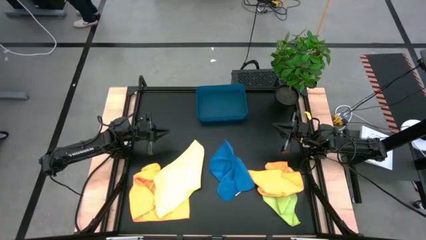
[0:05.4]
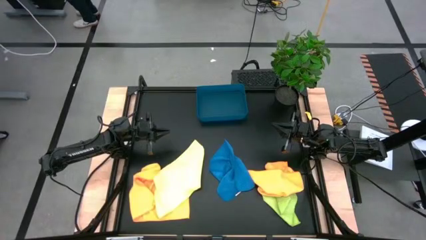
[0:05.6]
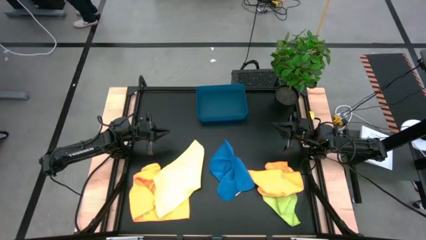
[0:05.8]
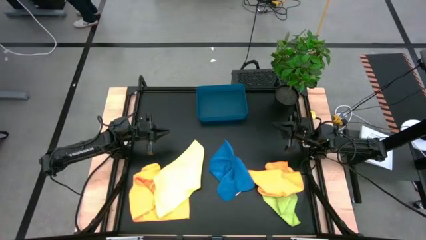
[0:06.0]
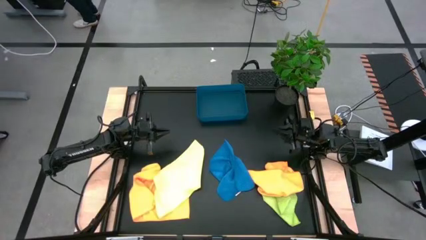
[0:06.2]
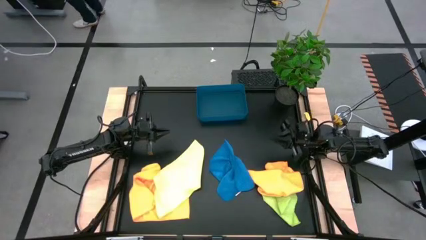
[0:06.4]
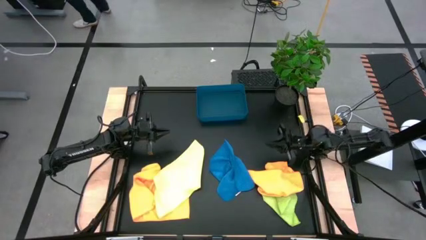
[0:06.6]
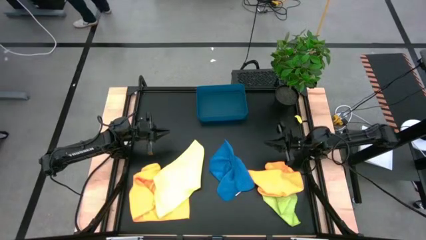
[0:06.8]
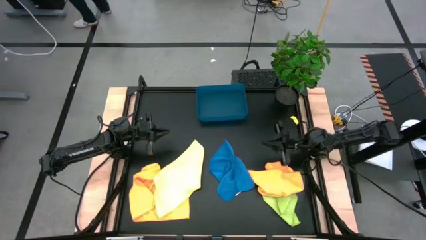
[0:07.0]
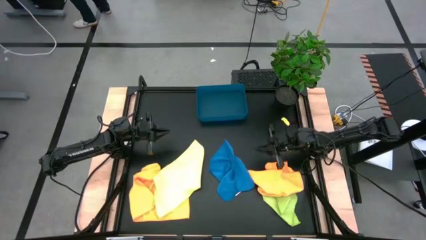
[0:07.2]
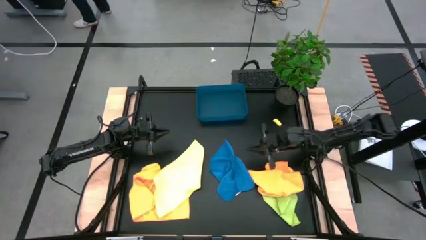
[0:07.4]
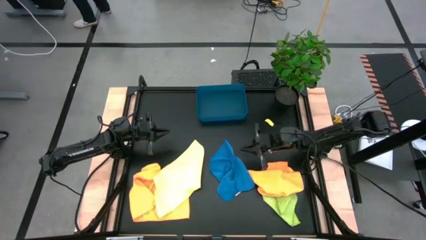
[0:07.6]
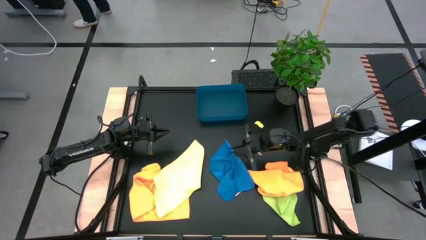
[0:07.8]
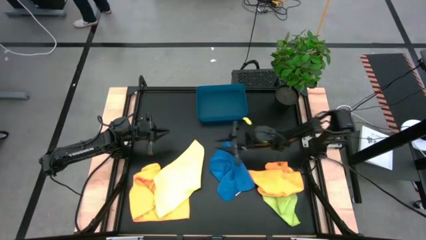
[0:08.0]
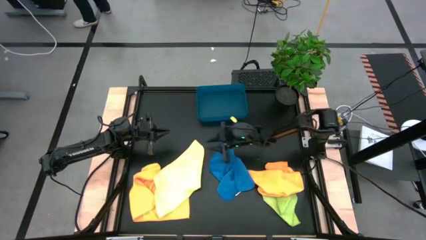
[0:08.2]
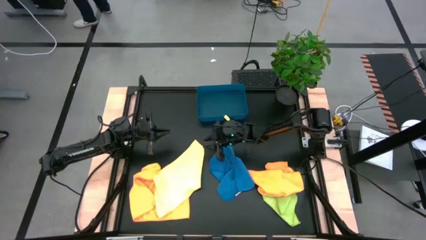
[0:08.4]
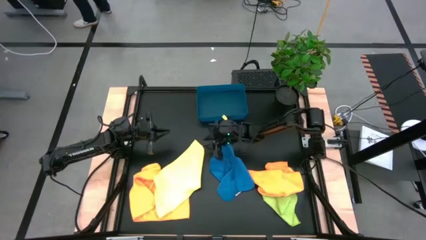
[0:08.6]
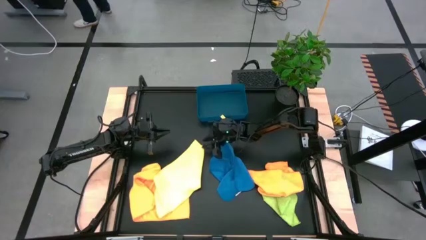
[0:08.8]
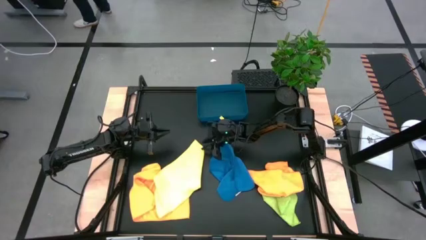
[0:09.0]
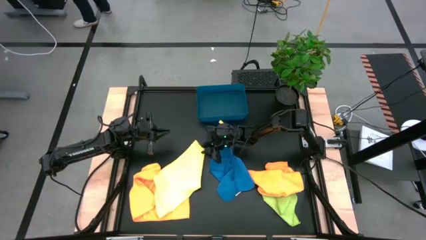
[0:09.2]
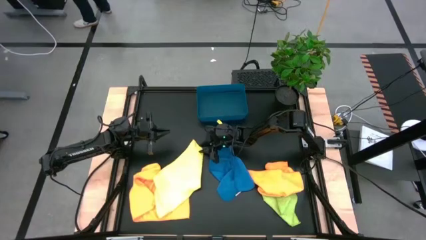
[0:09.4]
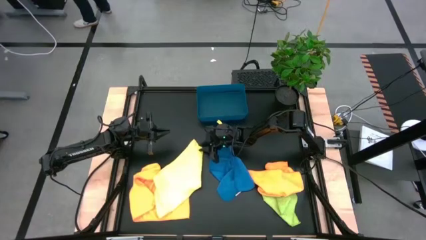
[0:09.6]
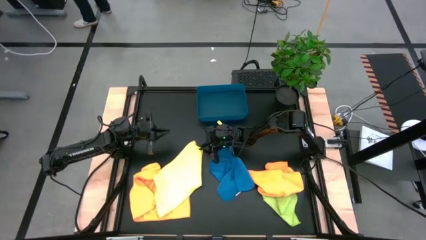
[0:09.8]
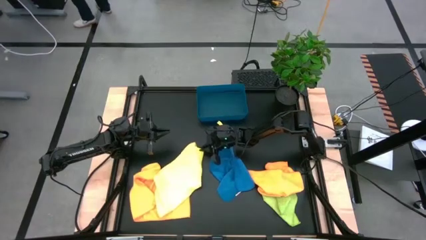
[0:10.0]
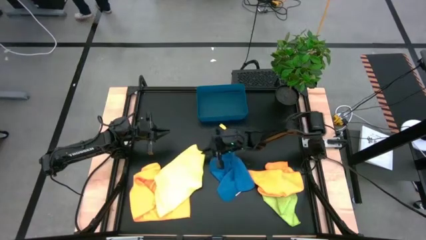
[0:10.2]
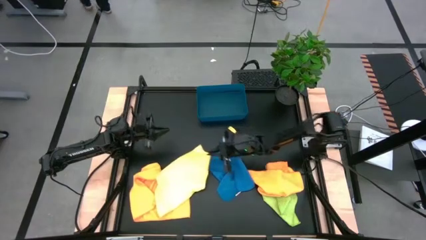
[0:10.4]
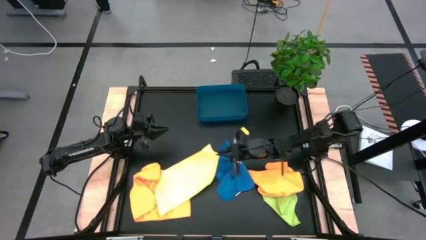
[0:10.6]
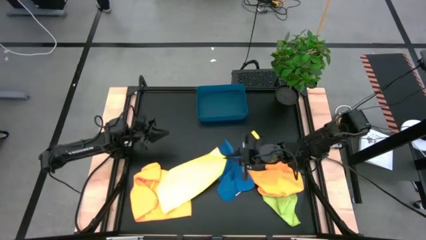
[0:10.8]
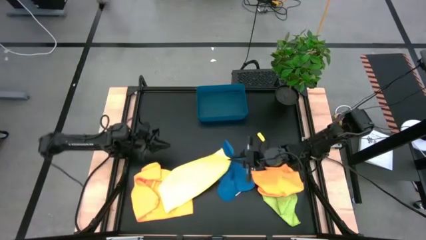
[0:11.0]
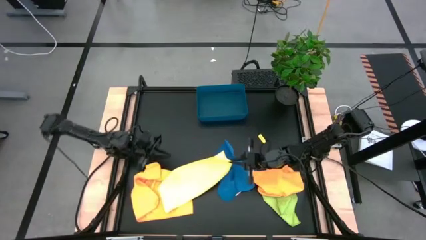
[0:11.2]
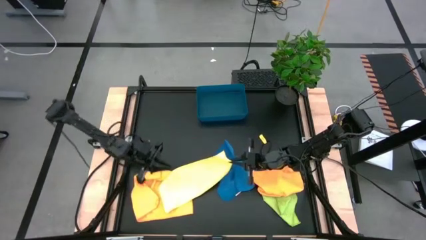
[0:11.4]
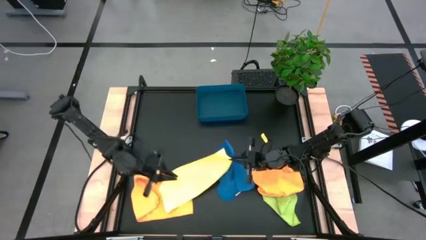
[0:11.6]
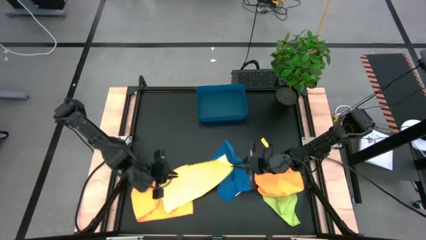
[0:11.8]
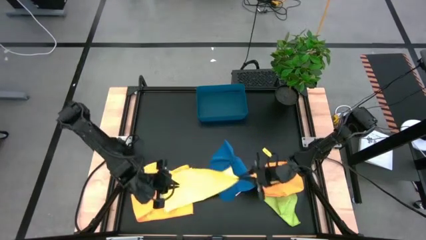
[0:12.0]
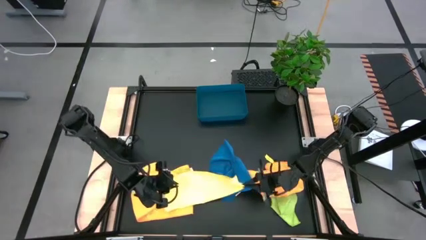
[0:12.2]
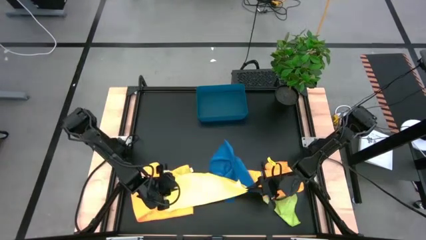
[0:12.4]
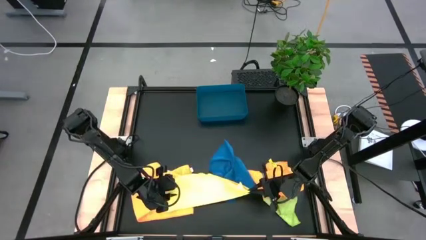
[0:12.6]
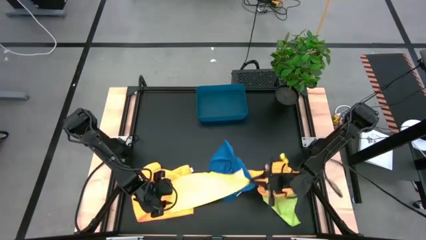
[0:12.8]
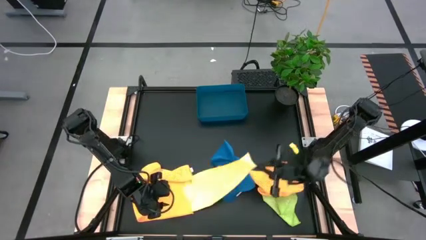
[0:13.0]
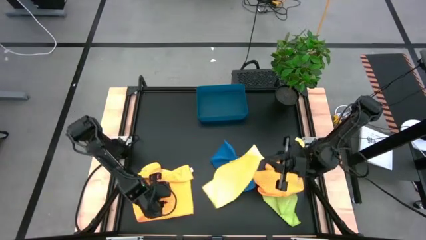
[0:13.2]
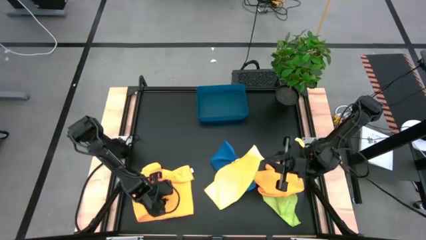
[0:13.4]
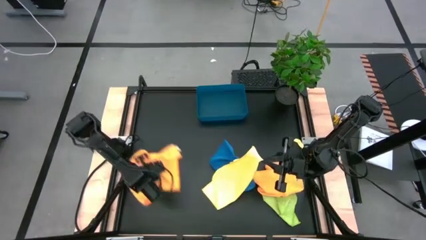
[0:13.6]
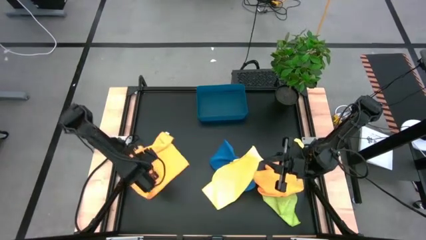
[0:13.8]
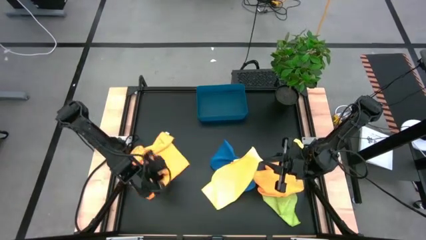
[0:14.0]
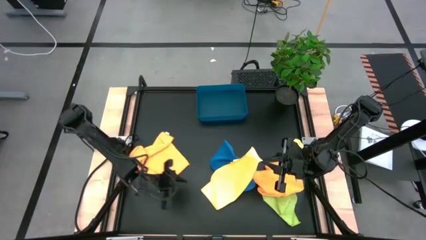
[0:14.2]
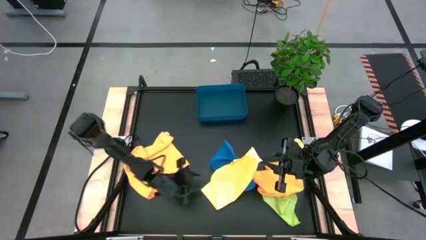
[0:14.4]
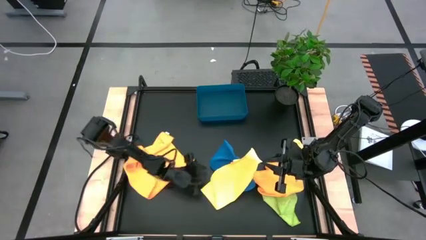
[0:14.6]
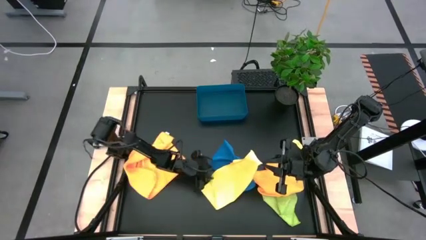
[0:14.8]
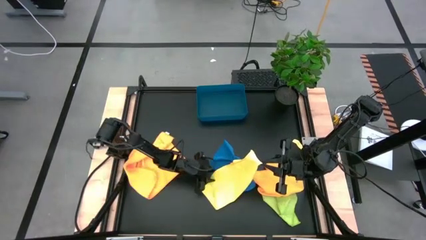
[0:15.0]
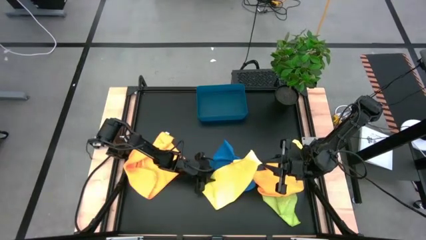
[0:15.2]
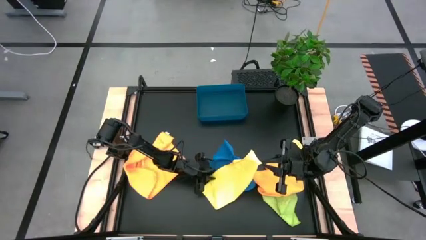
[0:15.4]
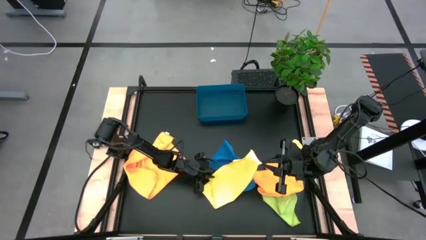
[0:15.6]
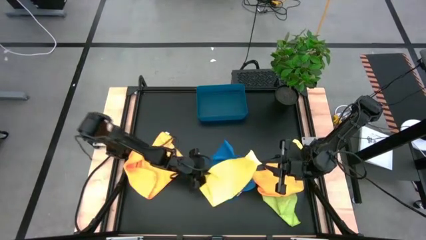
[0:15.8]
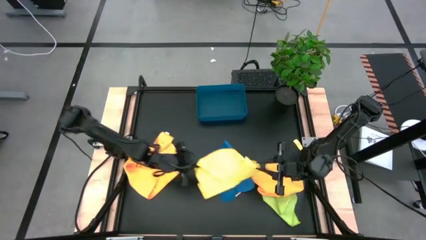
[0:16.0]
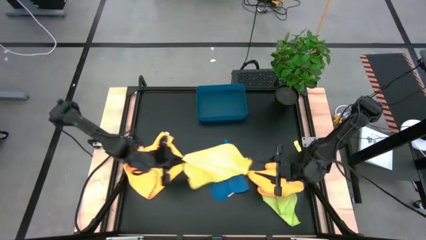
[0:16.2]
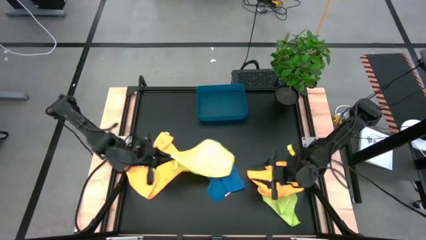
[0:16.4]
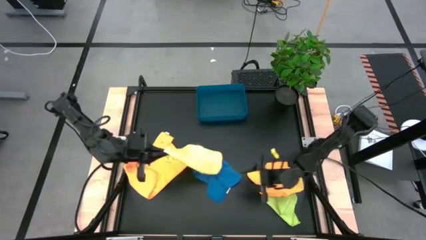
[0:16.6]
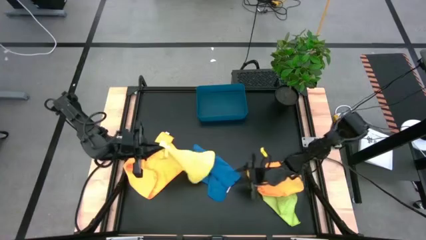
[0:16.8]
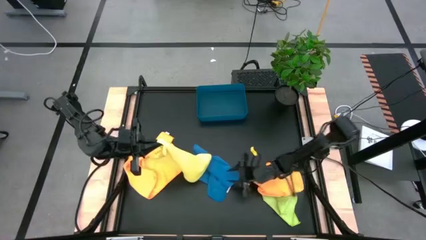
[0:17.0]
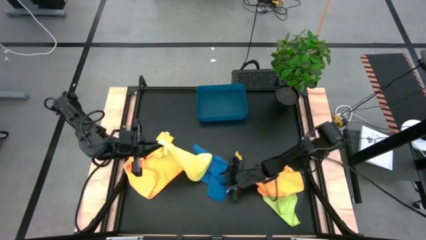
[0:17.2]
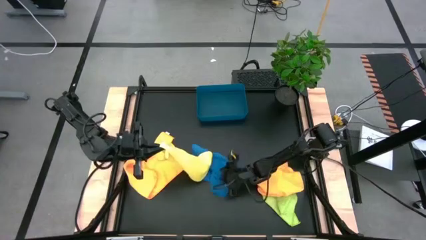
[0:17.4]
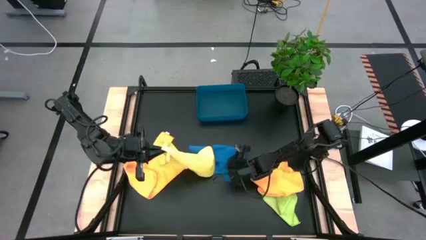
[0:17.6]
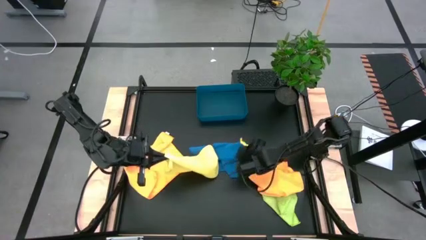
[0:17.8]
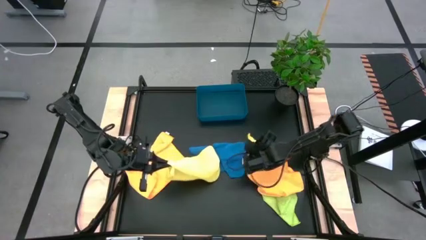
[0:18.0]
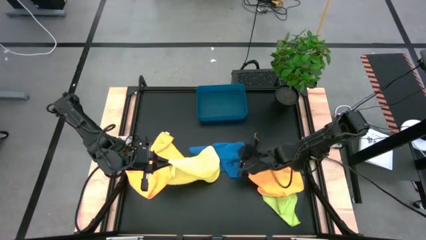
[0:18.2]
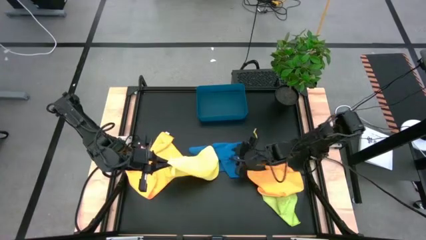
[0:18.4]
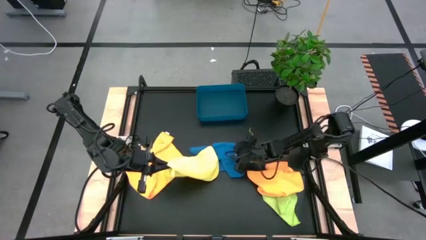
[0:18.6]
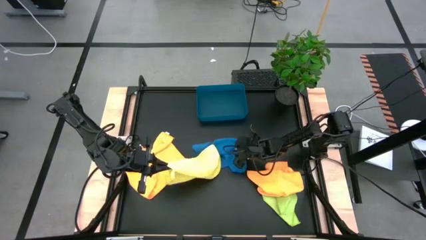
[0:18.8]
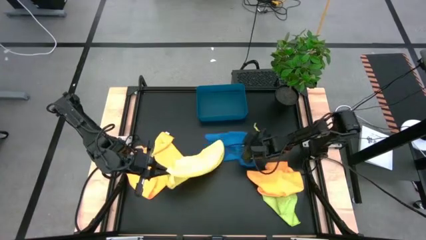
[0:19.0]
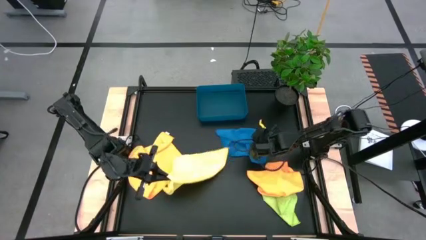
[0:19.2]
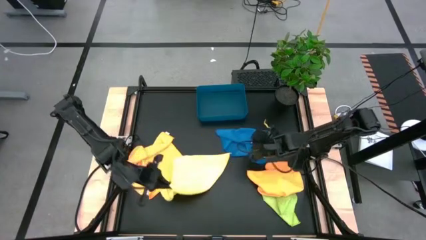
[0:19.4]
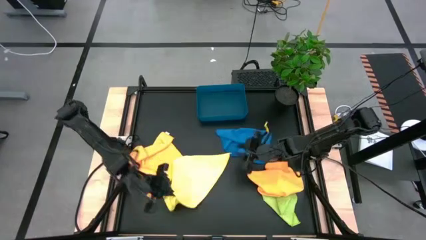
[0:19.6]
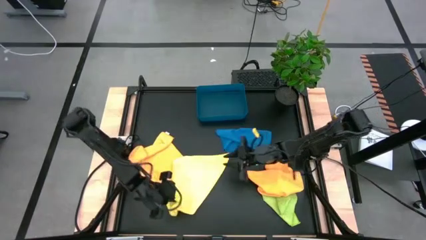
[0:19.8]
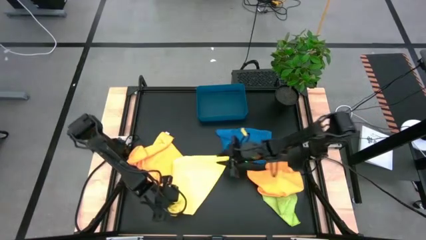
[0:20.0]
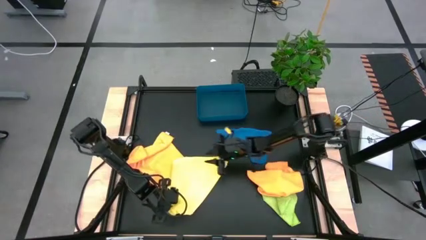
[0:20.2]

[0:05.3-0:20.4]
Task: Fold microfiber towels
Fold the yellow microfiber towel
